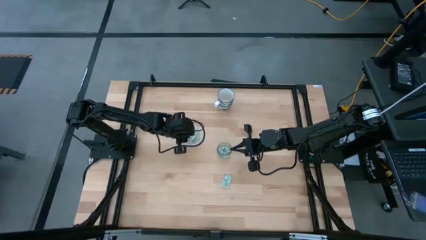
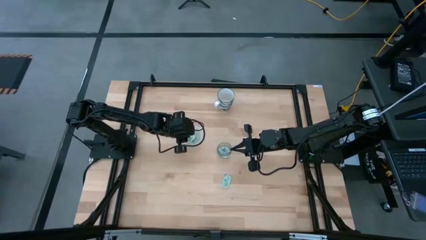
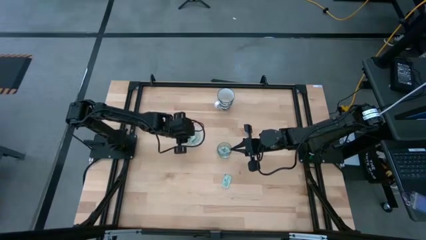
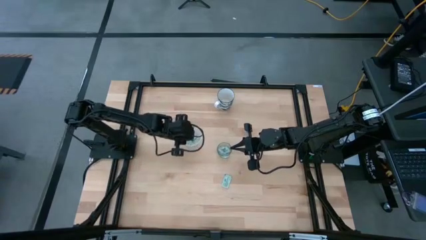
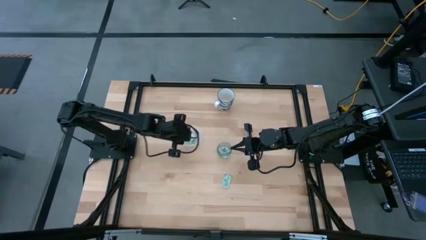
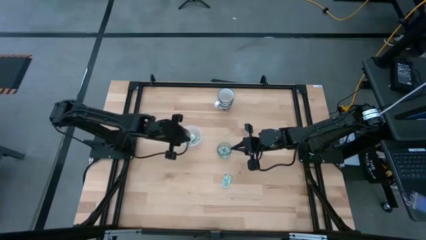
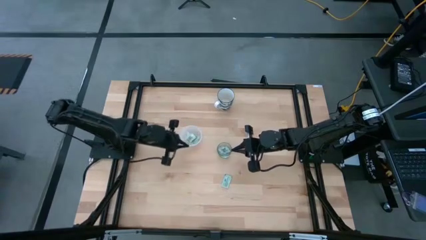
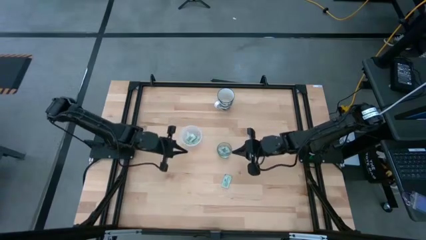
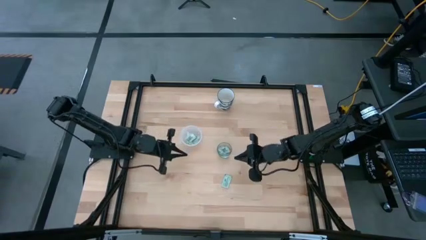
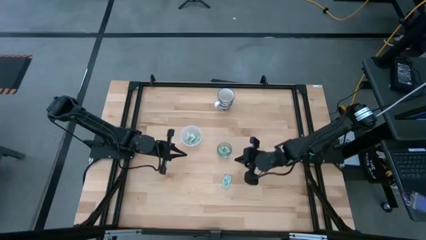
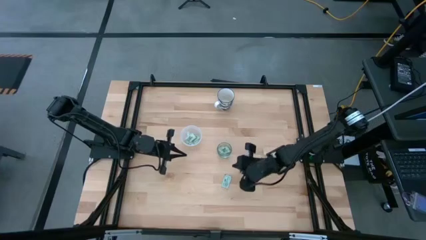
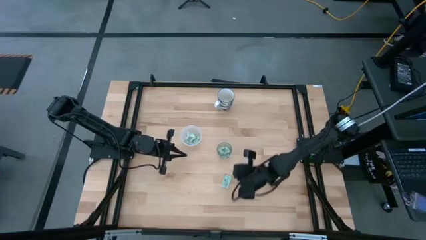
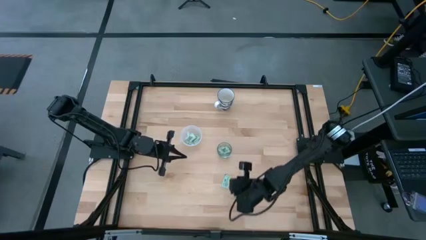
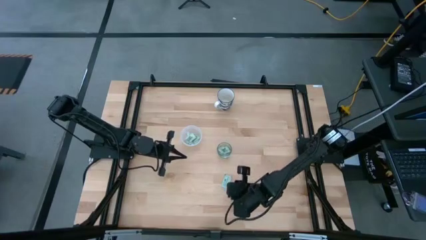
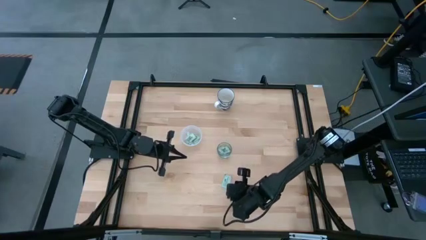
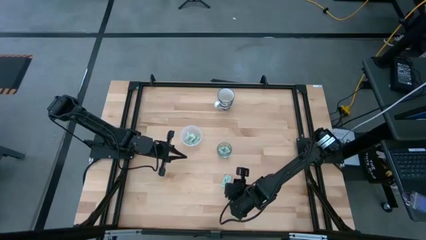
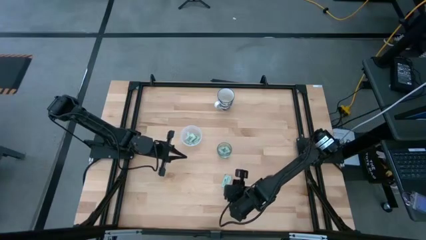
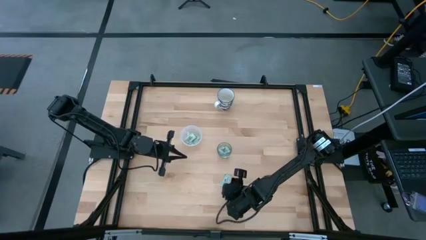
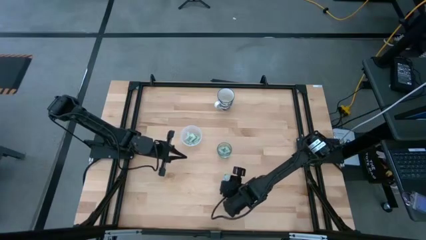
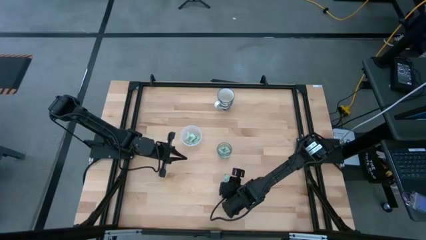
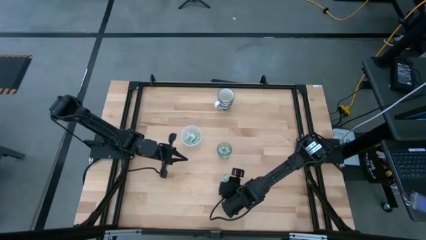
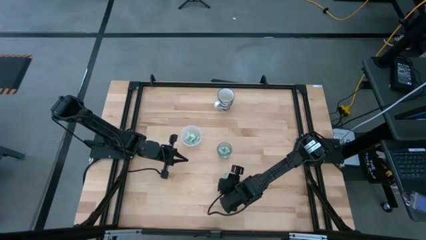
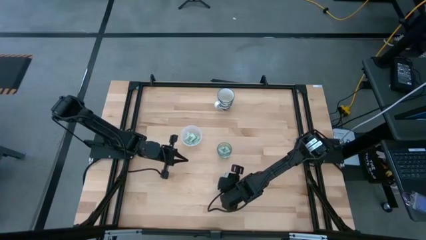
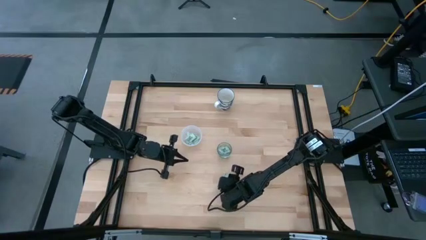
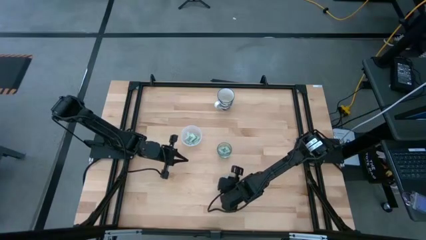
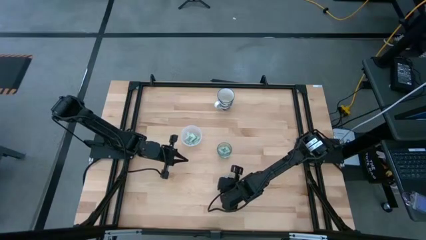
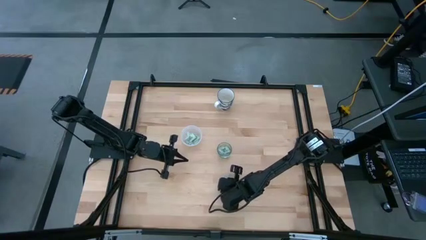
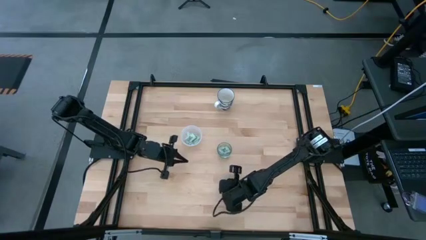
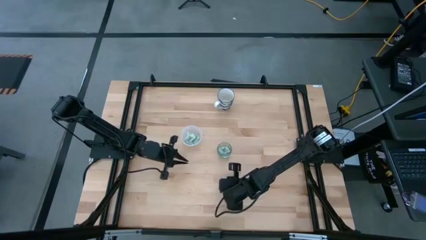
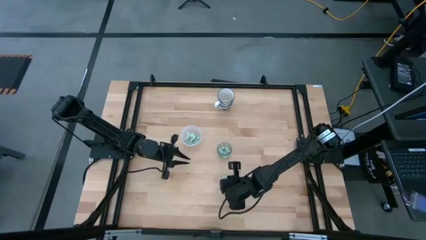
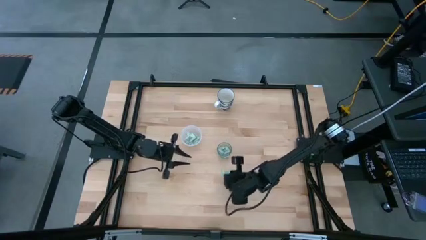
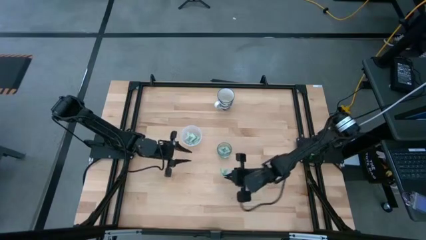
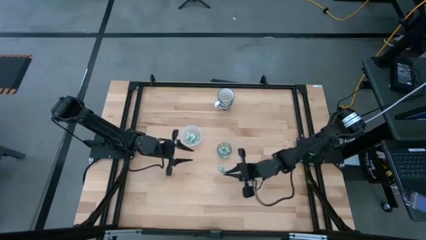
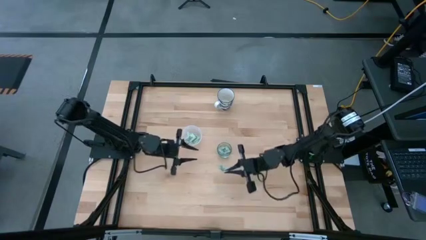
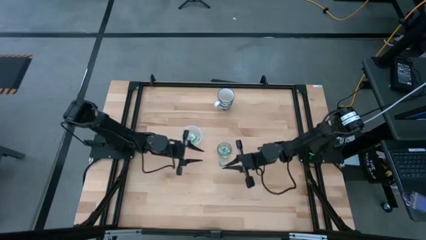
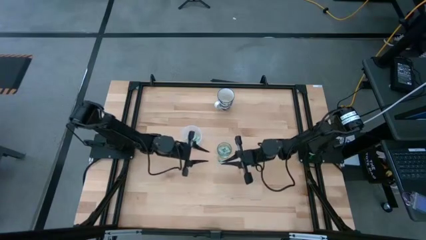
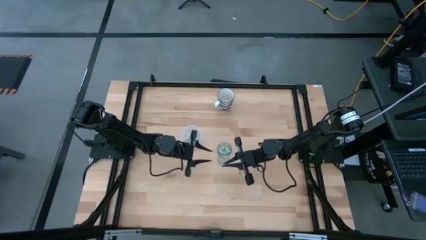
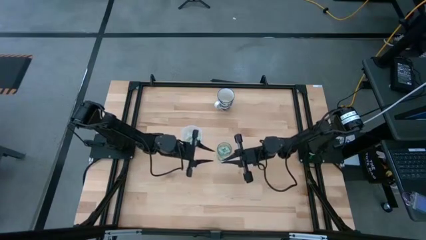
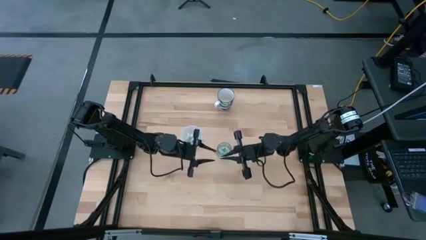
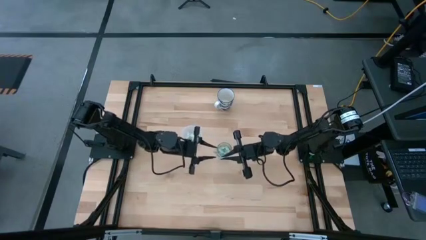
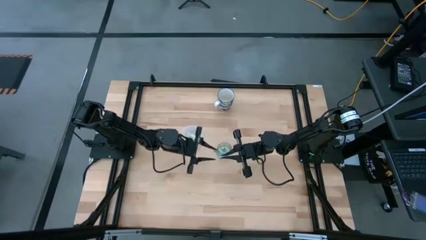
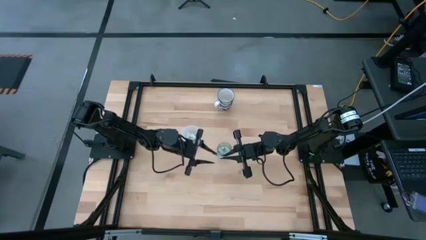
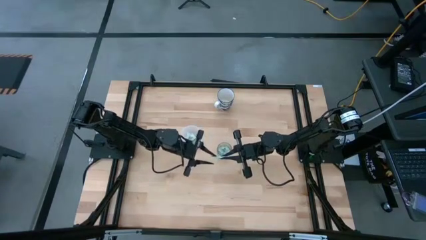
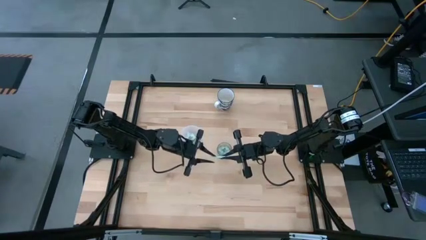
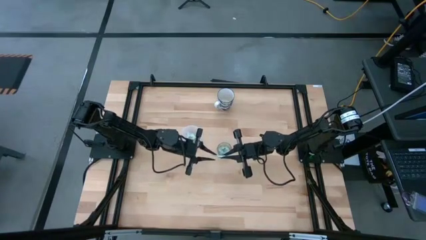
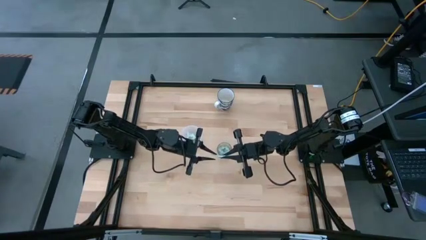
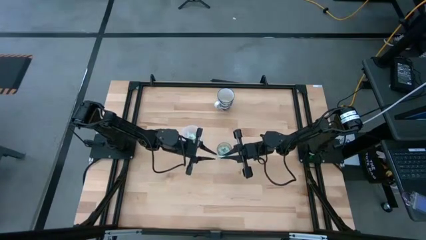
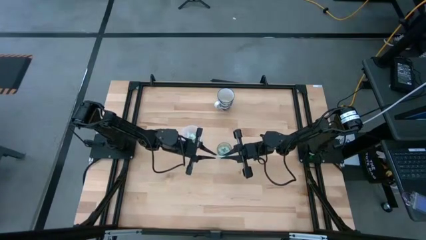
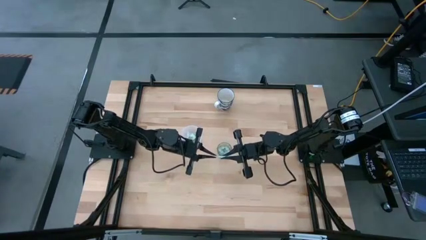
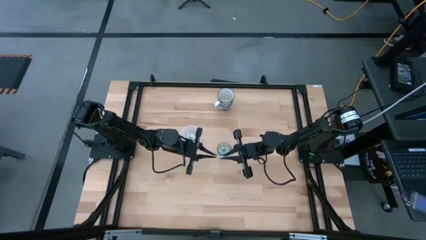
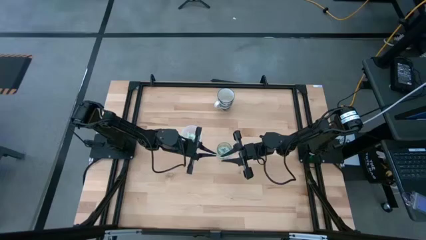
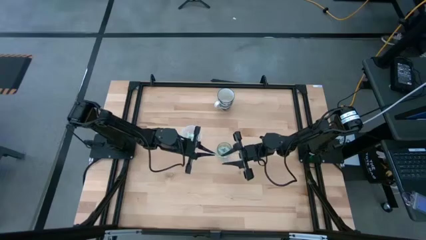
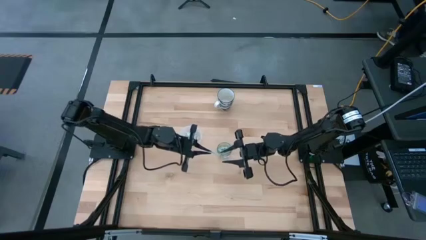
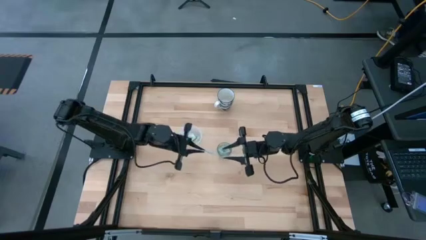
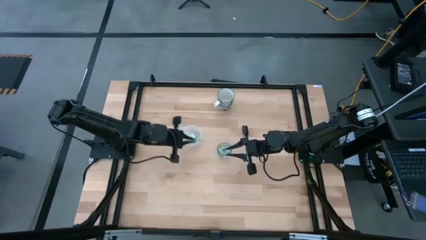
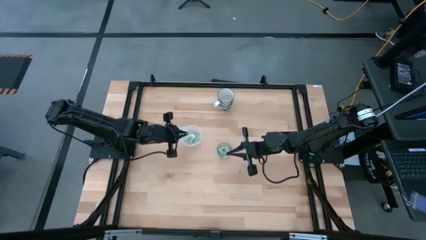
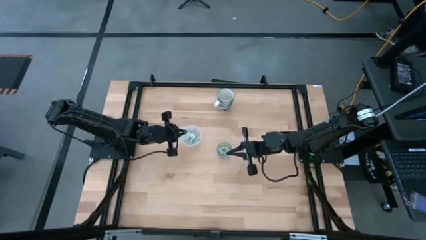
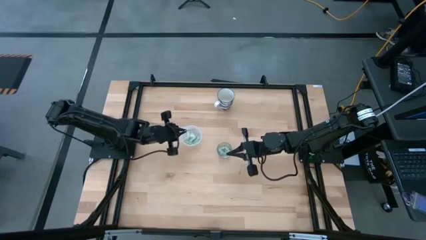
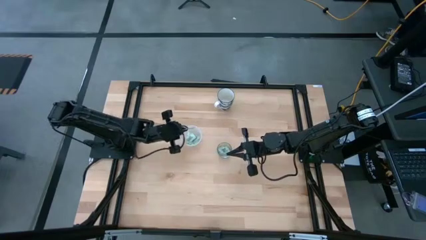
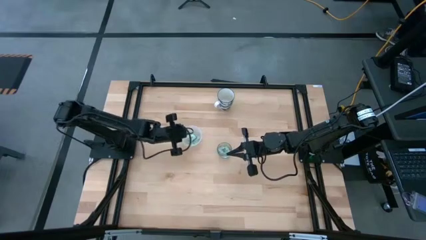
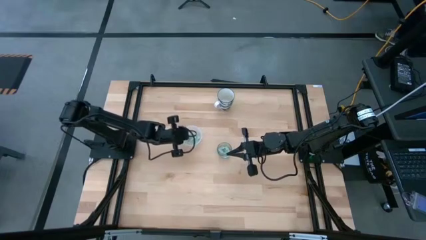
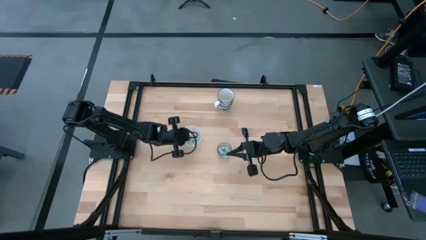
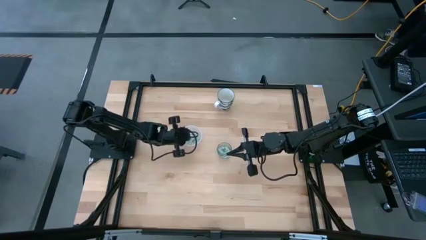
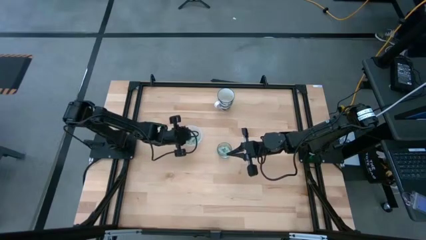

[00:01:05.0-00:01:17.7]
Task: Pick and place Stevia / Truvia into bins
Put the stevia packet into the plastic container

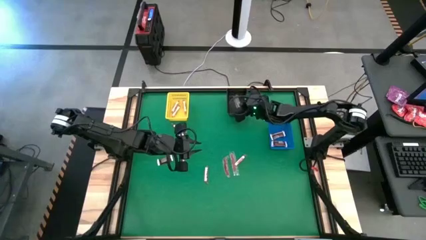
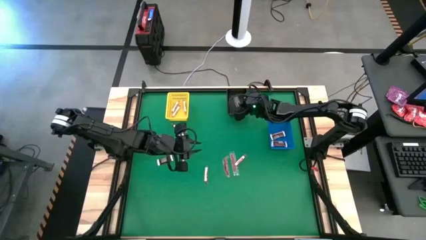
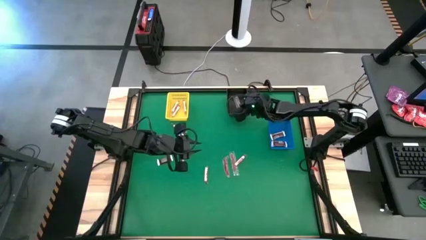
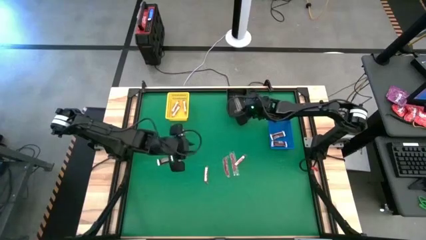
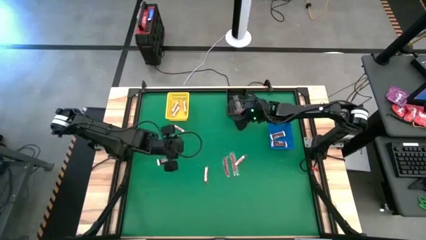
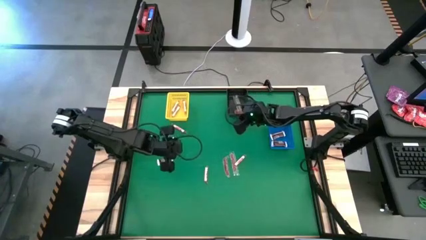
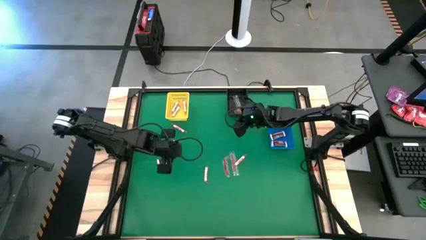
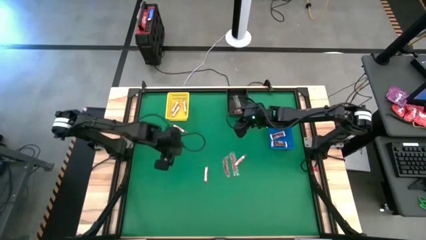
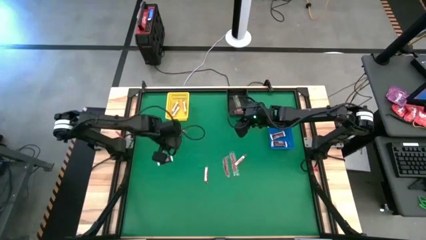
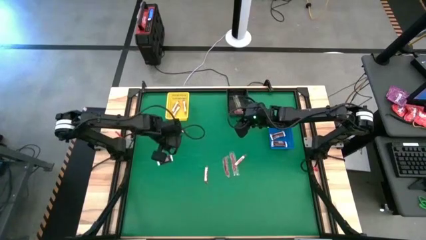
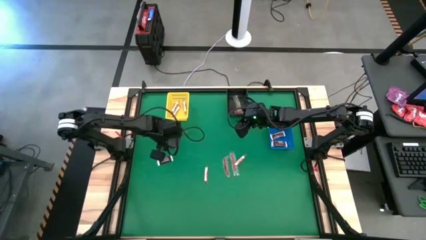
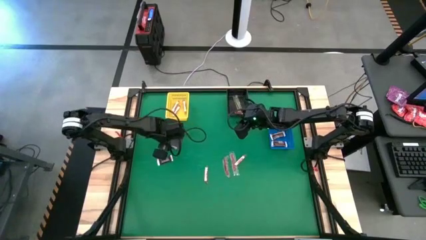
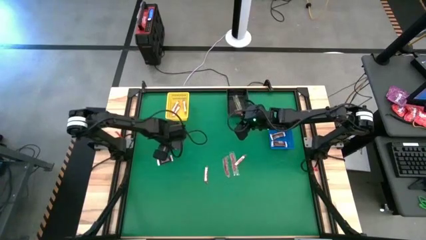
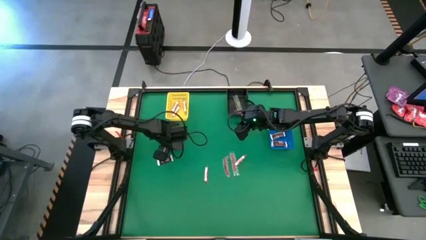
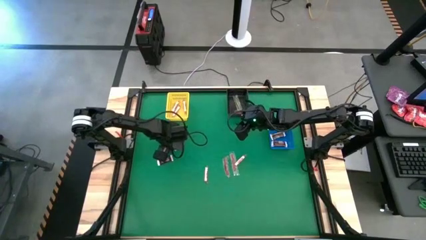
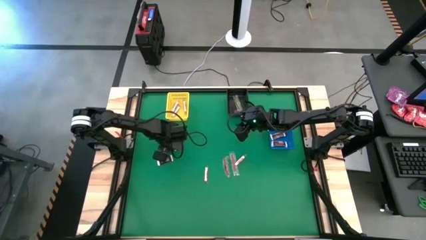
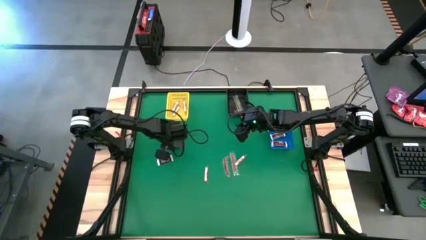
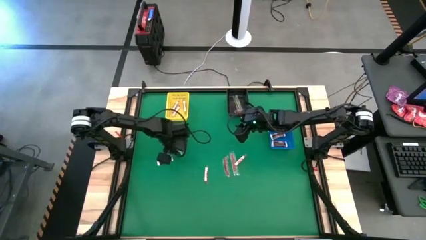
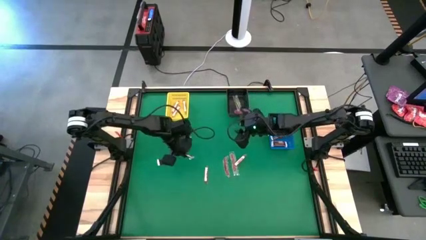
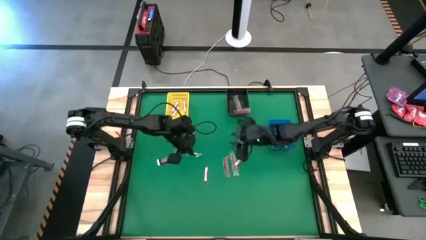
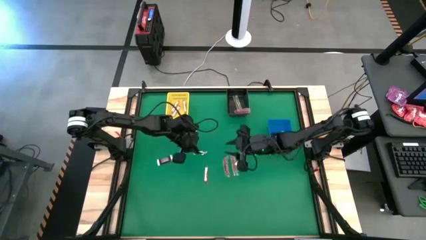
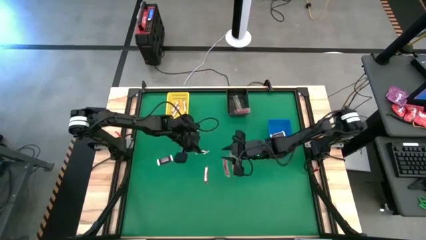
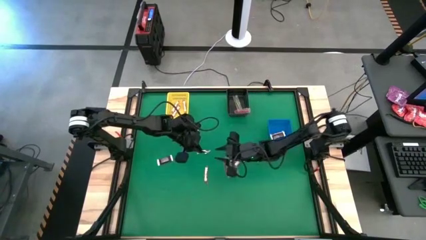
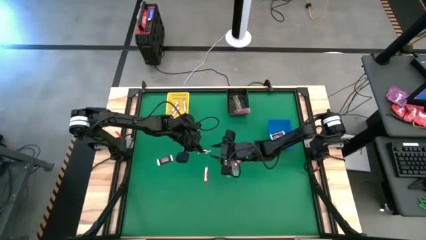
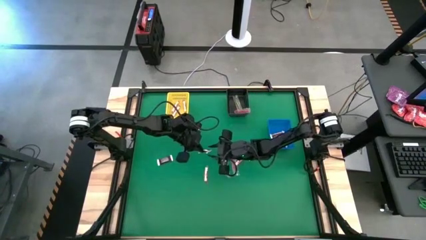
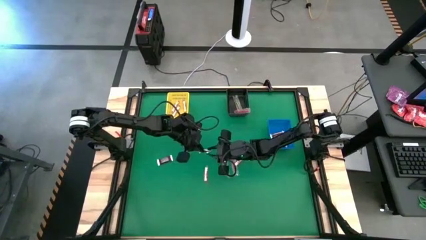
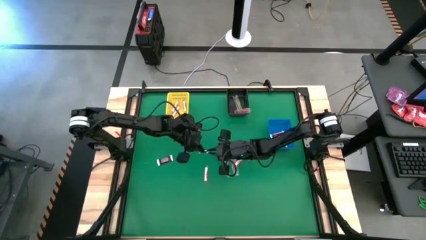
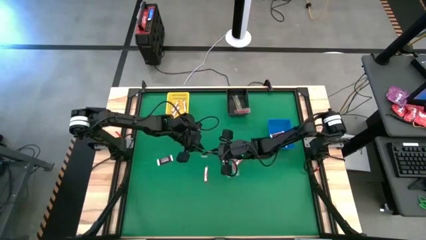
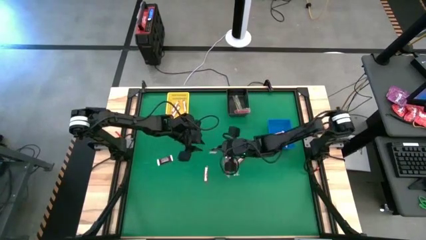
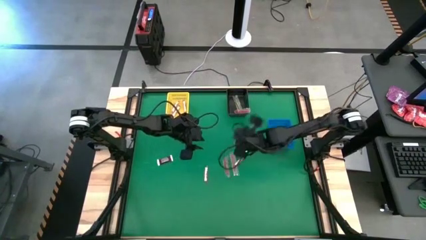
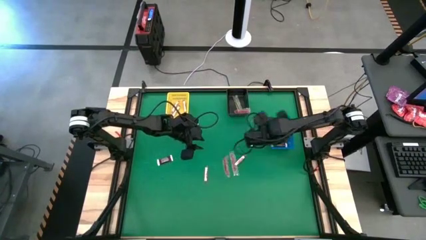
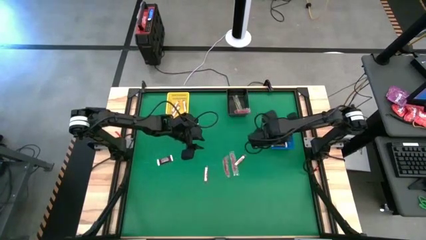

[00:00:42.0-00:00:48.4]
Task: Sort candy by brand, put in halloween buckets
Put the brown chocolate into the blue basket
